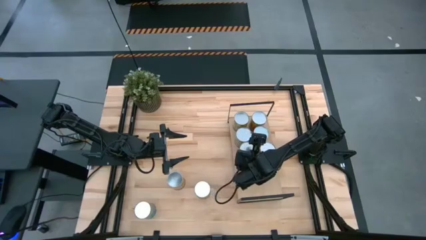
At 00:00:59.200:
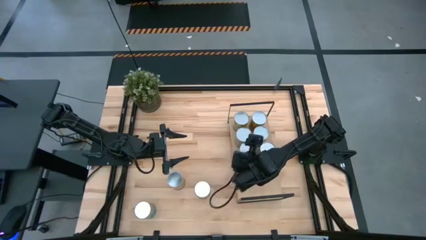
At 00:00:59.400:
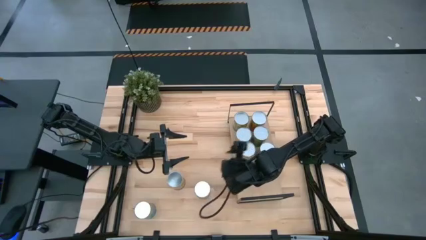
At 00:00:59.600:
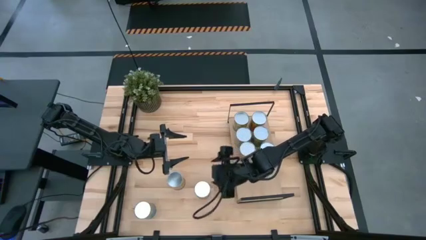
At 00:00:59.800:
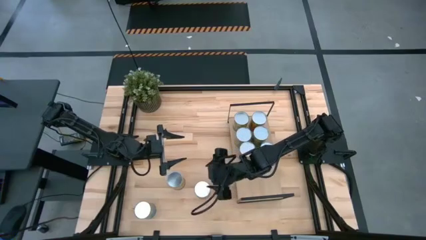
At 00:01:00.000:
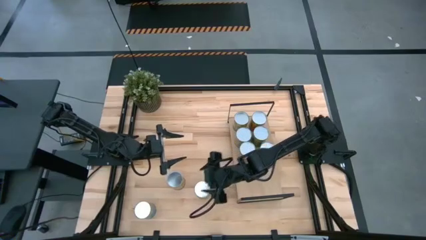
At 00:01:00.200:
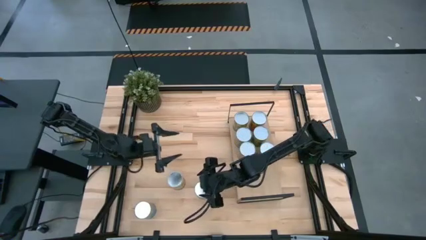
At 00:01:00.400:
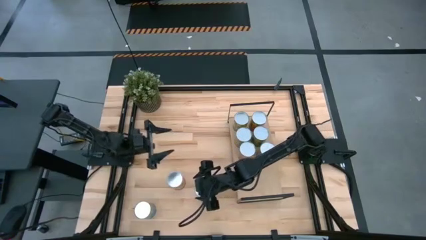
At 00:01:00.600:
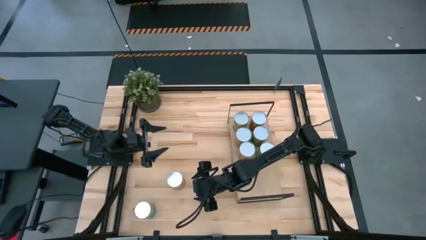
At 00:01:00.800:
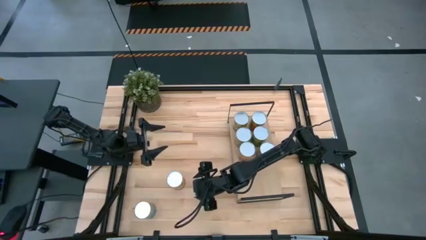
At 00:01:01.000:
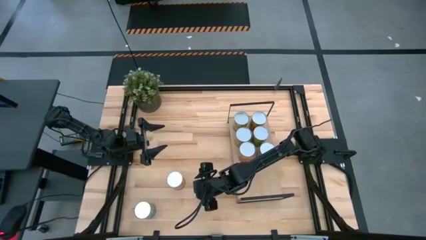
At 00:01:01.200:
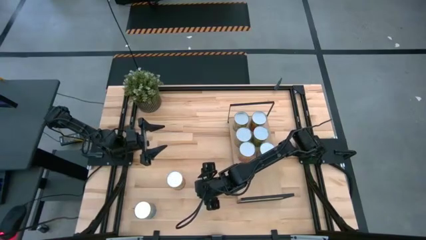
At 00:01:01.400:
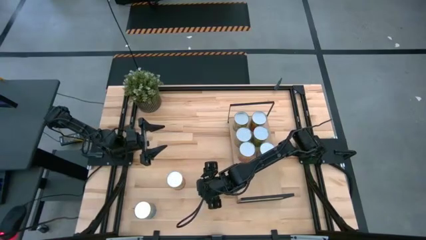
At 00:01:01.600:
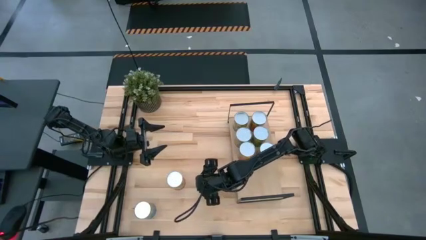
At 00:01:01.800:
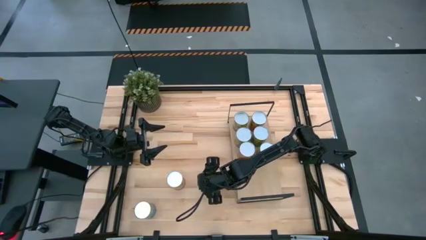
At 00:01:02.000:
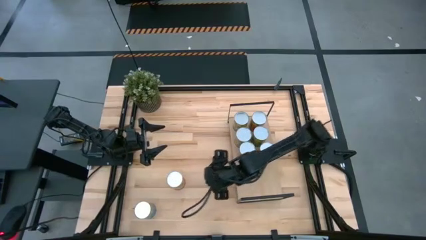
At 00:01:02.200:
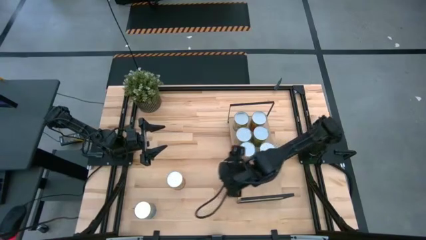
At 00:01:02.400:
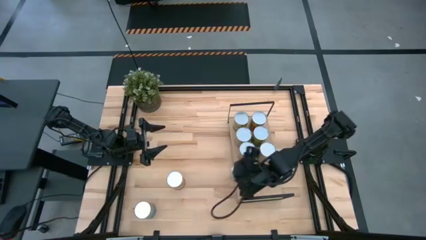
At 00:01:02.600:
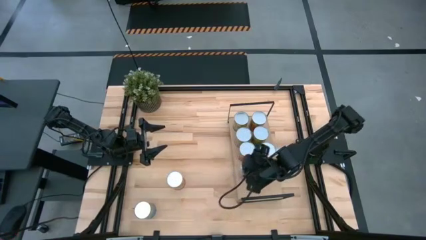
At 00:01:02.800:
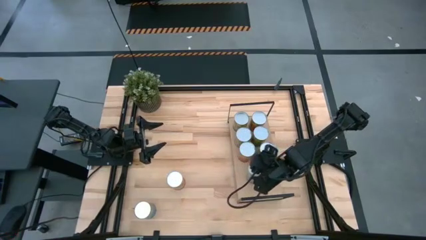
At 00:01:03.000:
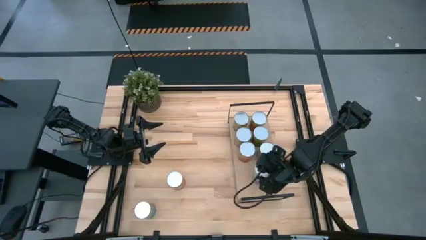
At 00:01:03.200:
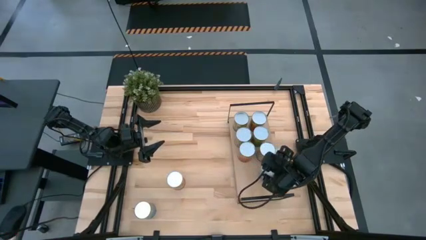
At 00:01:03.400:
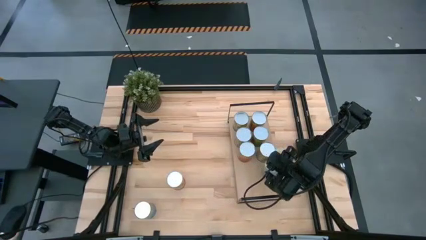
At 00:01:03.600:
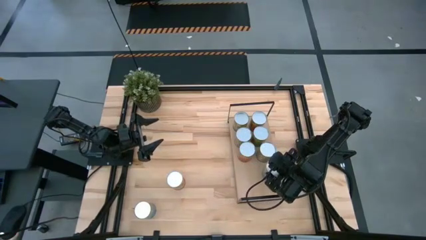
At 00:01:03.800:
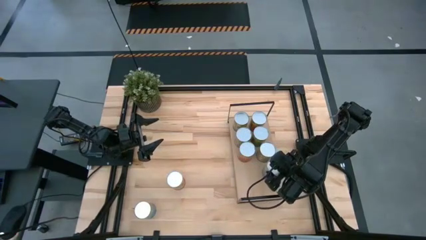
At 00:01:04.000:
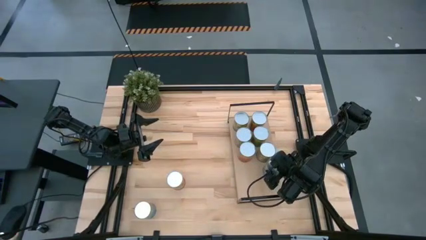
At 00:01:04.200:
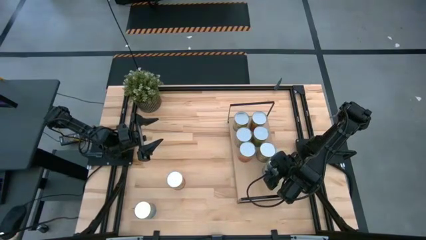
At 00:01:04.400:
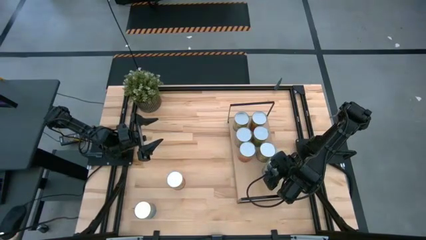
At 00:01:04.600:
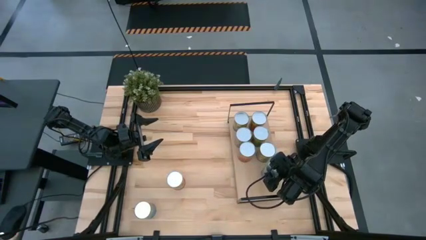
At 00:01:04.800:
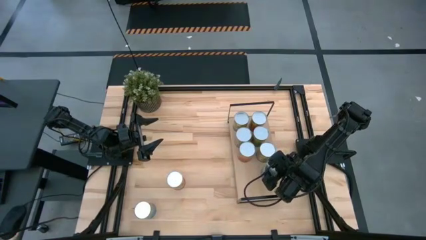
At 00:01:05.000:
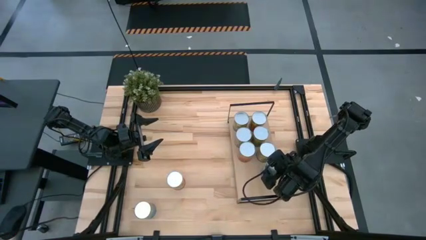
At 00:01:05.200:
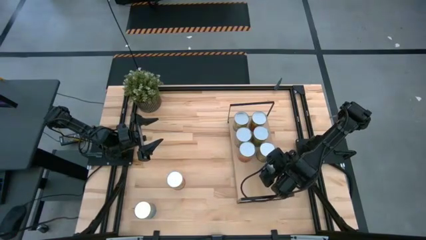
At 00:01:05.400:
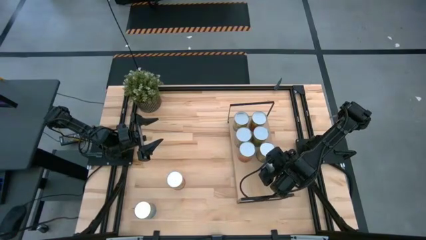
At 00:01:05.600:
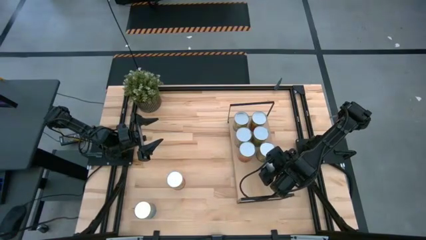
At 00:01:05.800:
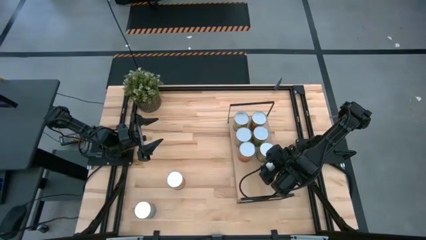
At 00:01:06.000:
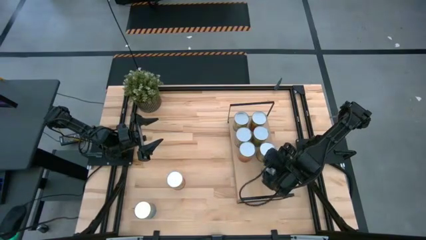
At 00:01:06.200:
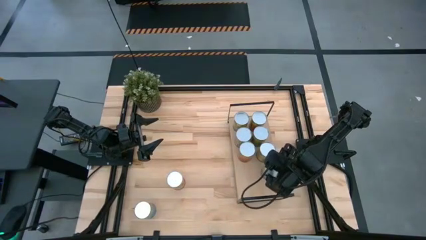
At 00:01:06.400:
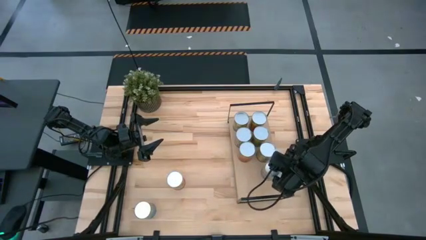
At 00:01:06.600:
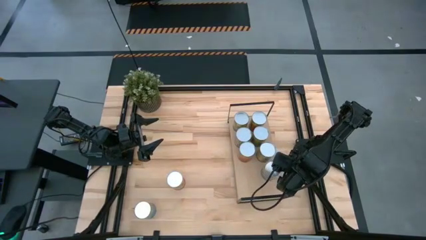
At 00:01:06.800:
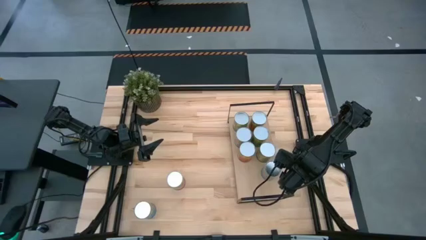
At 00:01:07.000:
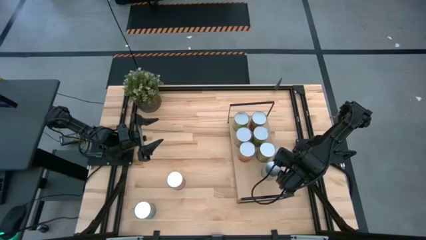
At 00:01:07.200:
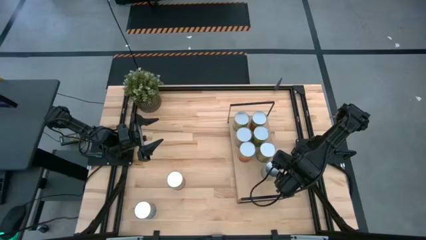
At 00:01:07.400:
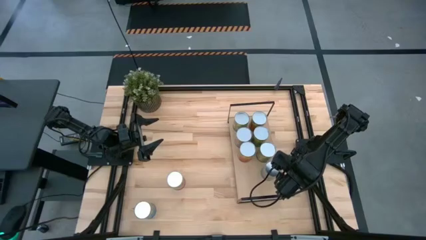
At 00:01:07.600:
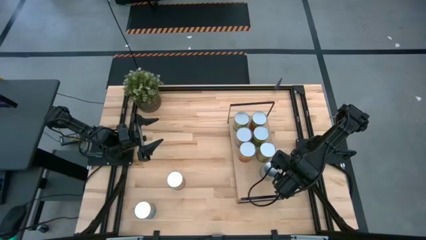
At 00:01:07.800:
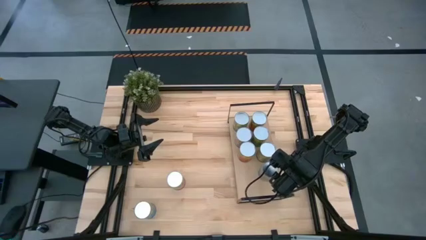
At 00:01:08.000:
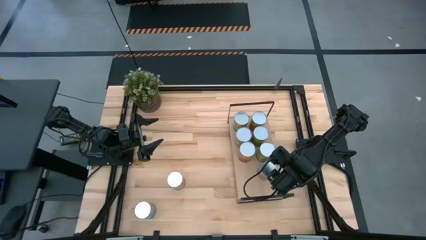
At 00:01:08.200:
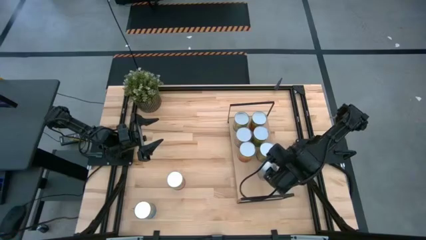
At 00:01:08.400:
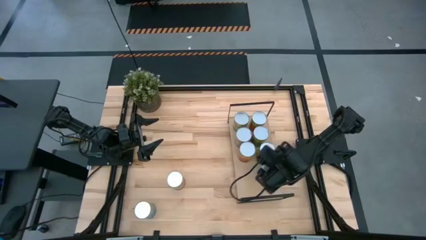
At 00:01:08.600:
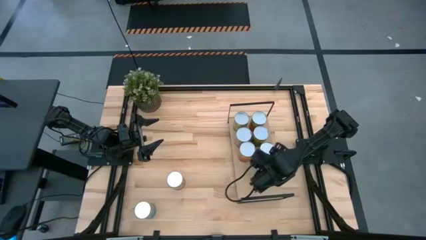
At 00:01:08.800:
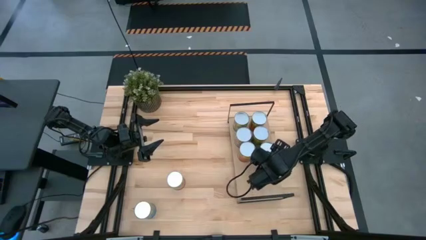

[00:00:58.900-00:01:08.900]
Task: Pick and place cans onto a shelf
Put the canned tomatoes on the shelf
